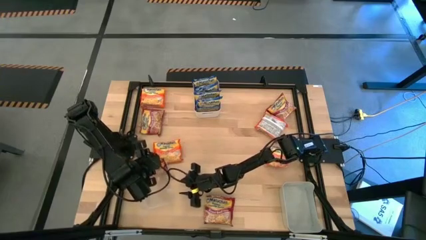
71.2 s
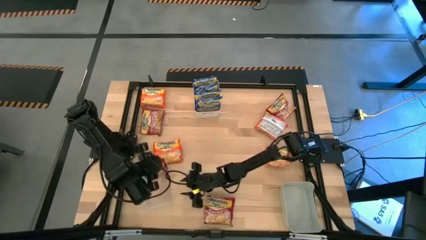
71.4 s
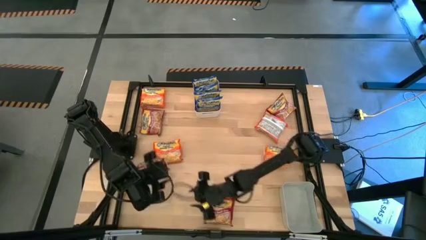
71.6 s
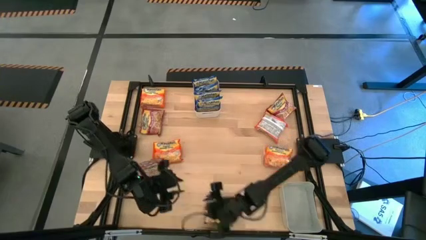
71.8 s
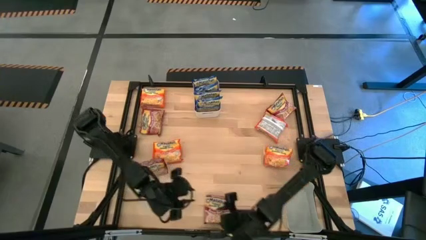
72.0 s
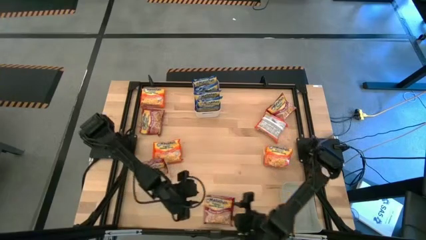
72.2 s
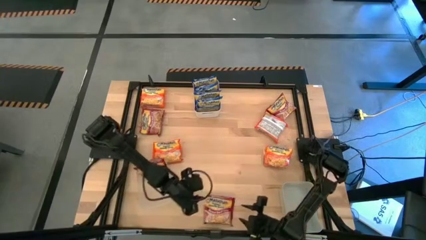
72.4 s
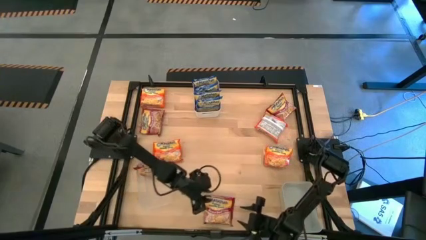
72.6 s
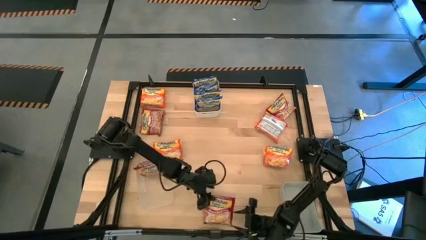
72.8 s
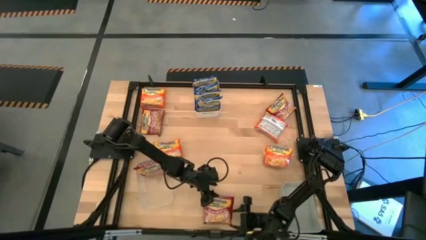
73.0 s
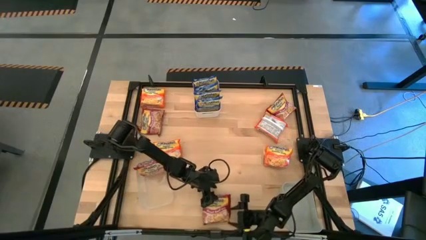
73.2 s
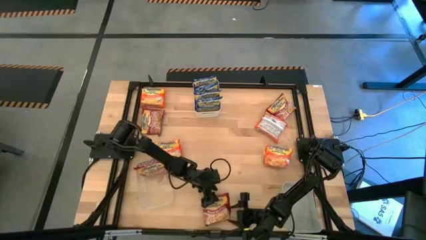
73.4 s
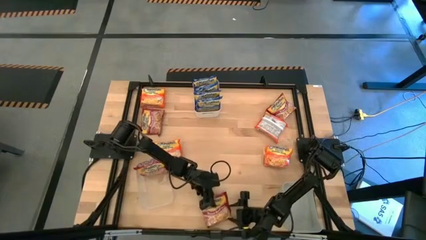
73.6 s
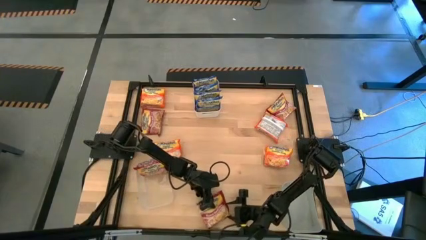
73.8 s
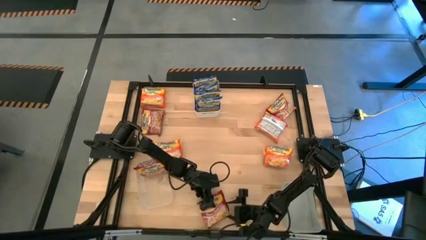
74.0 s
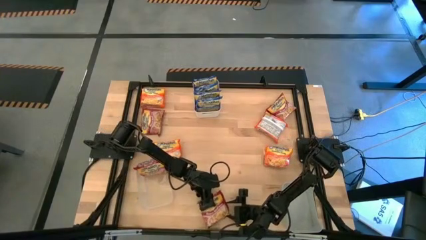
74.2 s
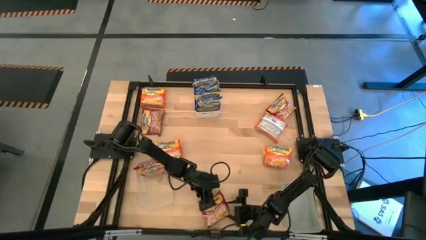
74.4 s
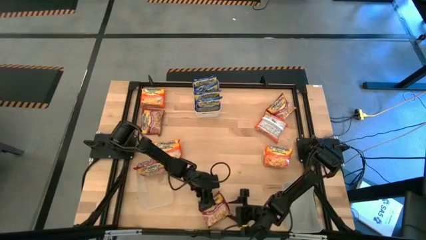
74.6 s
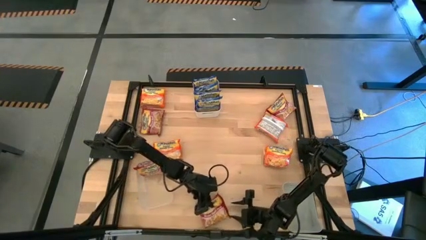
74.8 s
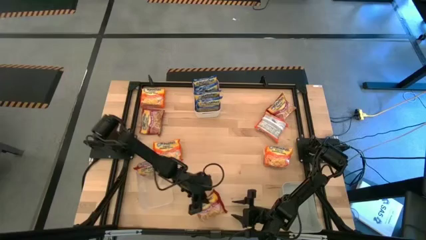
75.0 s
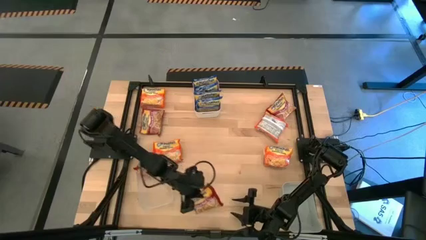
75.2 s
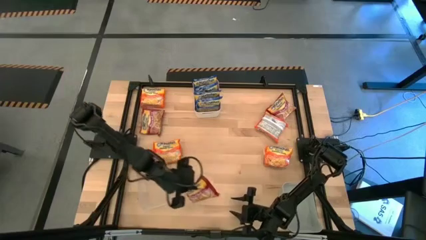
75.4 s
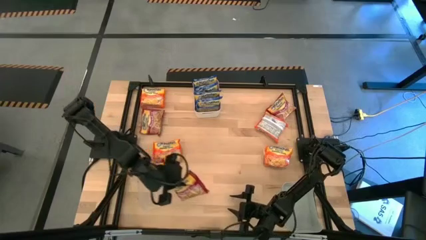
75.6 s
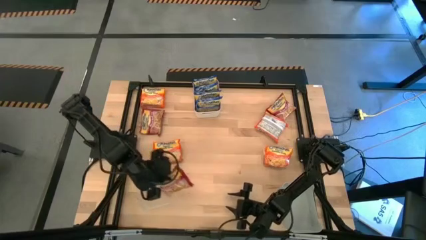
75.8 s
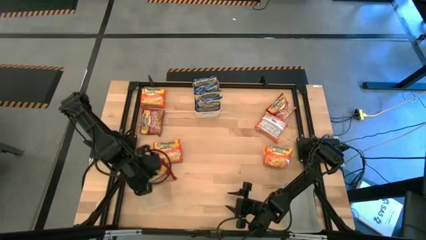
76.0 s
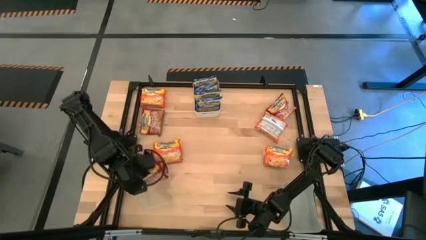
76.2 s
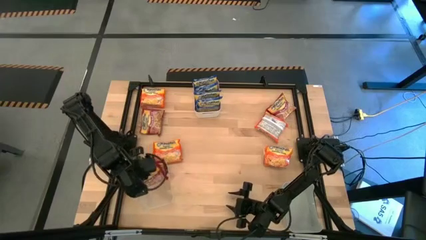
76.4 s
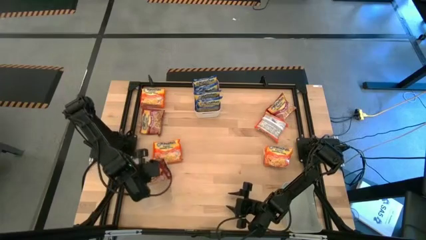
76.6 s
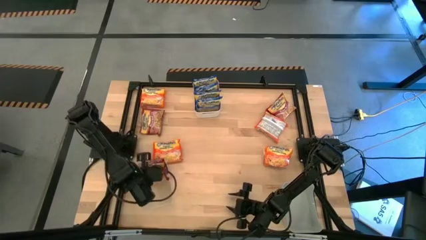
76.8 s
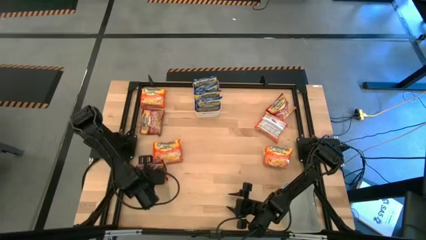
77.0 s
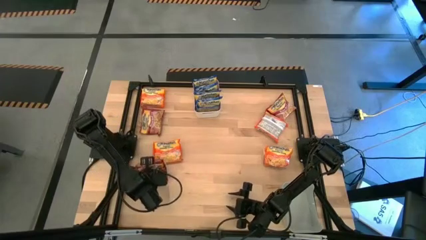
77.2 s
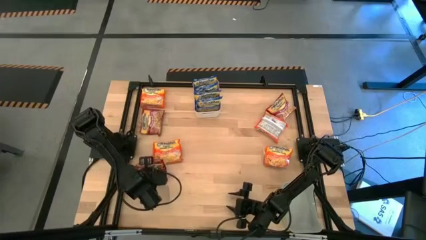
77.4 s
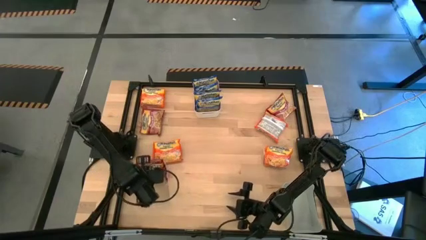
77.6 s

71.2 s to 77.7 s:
Task: Sort Maruchan noodles
Put the red noodle pack into the transparent bin

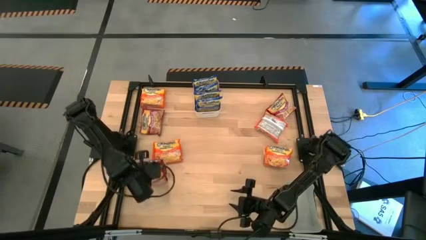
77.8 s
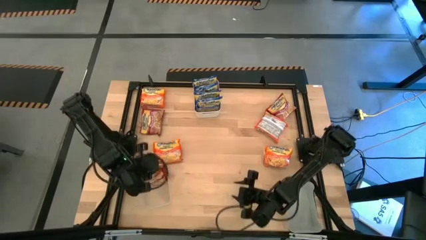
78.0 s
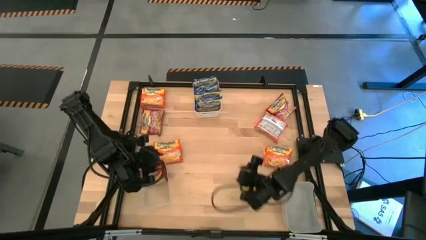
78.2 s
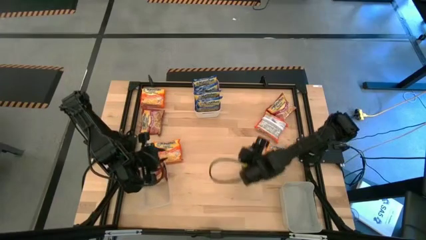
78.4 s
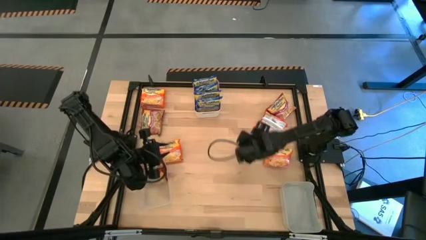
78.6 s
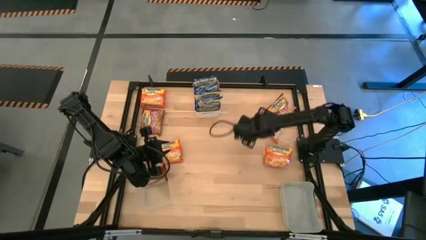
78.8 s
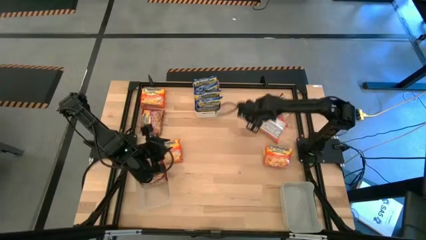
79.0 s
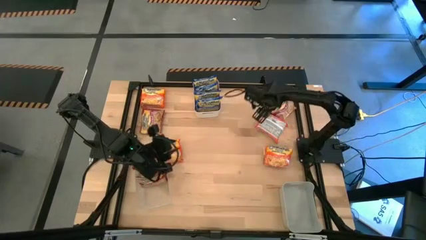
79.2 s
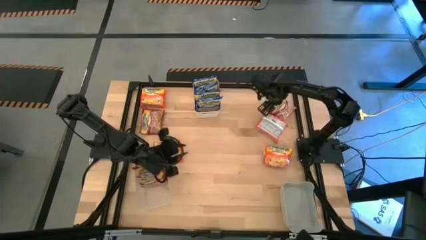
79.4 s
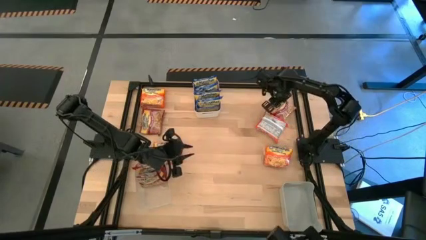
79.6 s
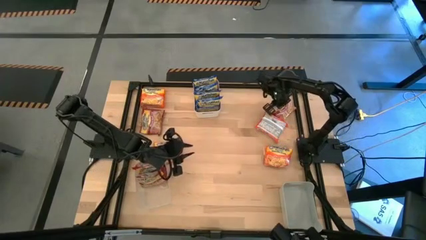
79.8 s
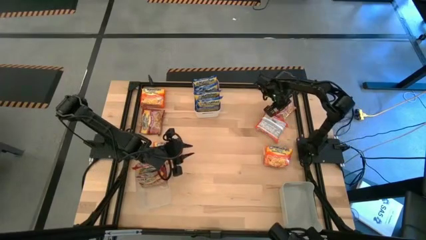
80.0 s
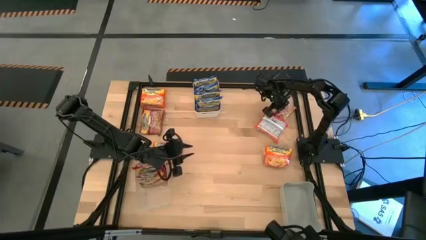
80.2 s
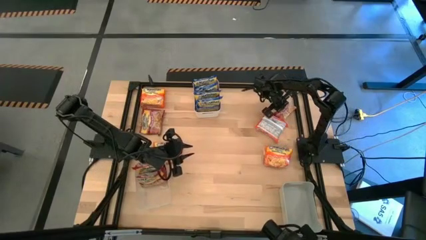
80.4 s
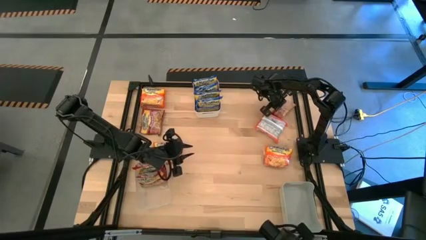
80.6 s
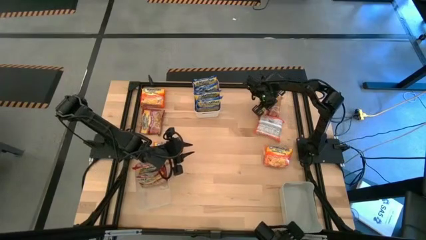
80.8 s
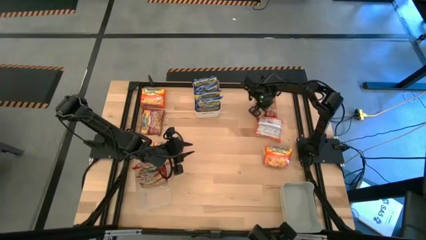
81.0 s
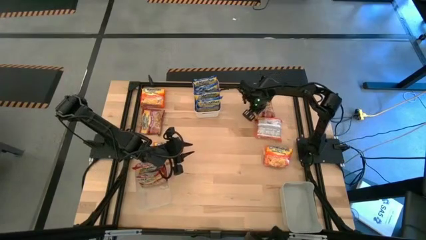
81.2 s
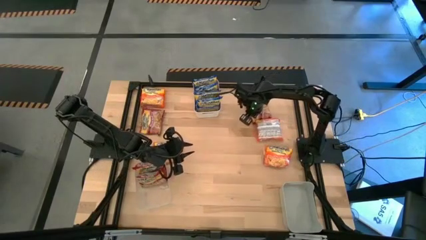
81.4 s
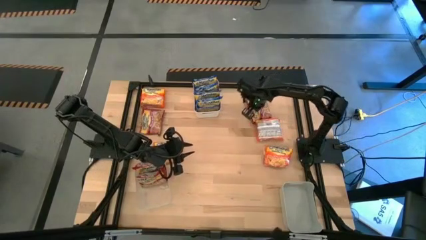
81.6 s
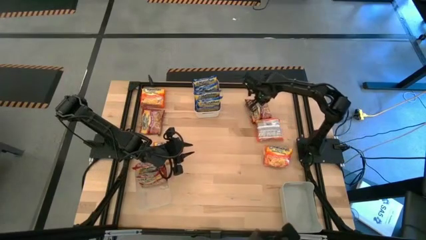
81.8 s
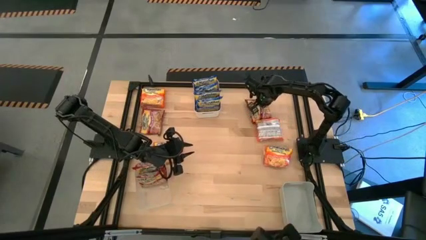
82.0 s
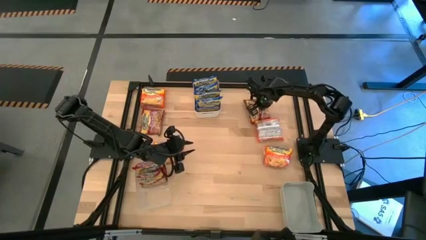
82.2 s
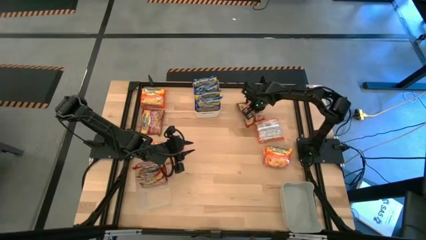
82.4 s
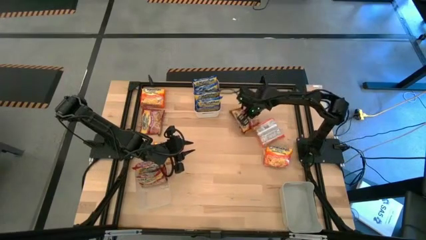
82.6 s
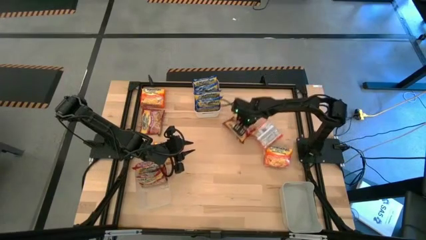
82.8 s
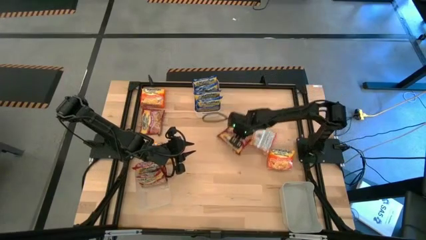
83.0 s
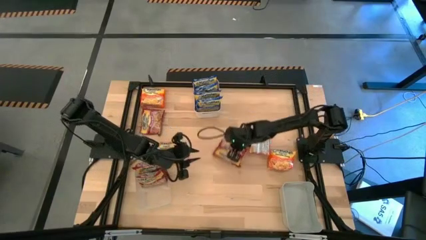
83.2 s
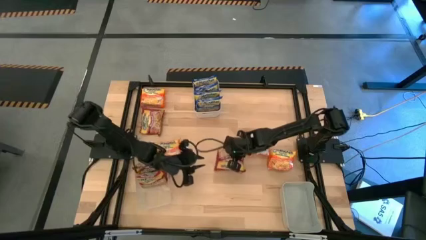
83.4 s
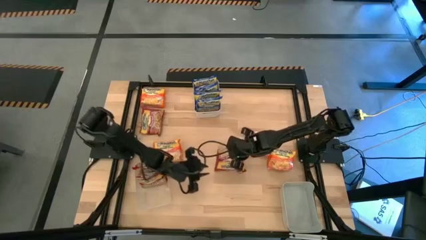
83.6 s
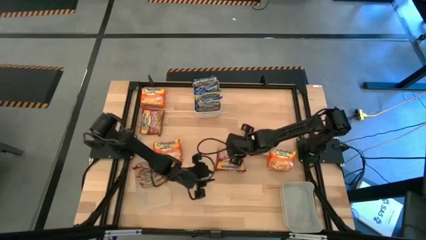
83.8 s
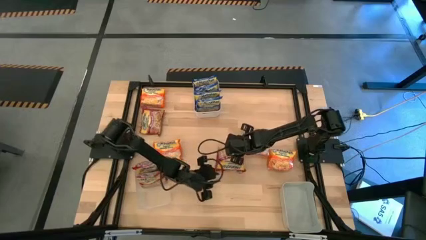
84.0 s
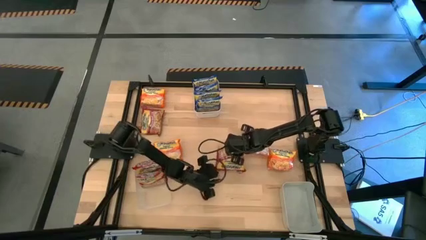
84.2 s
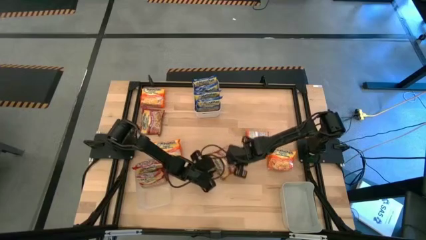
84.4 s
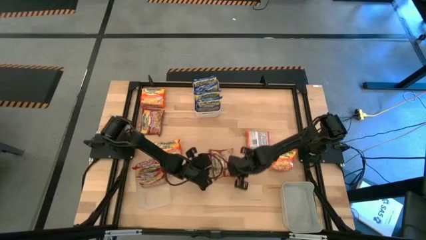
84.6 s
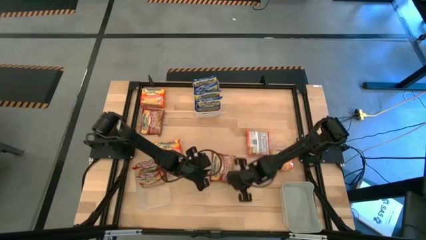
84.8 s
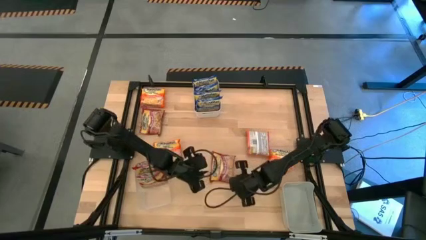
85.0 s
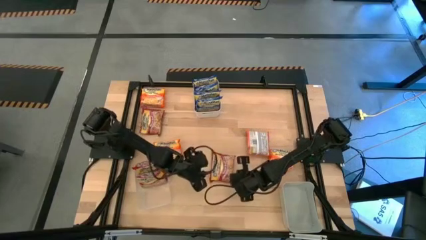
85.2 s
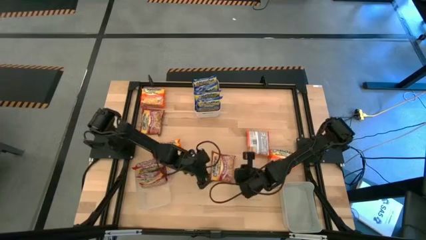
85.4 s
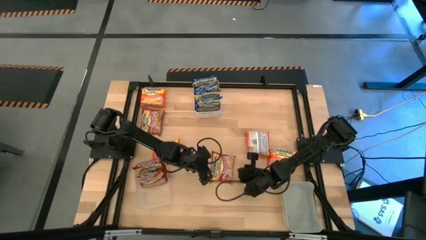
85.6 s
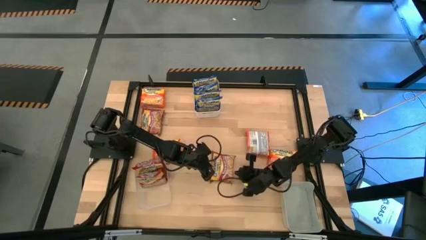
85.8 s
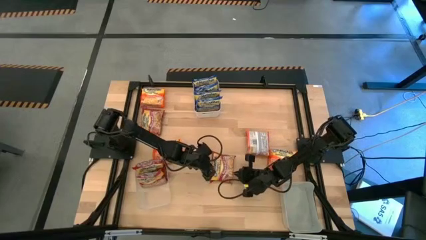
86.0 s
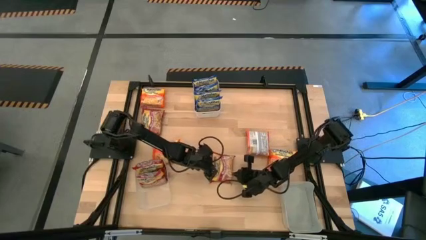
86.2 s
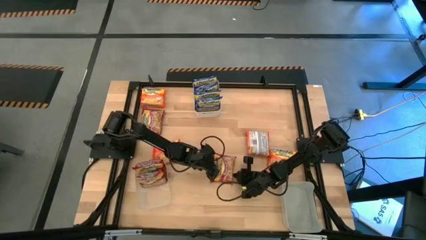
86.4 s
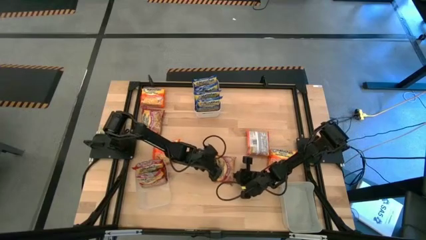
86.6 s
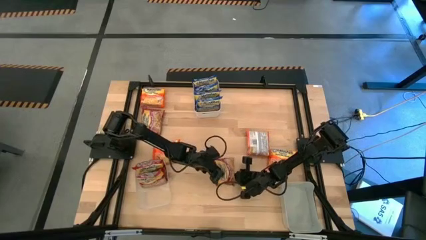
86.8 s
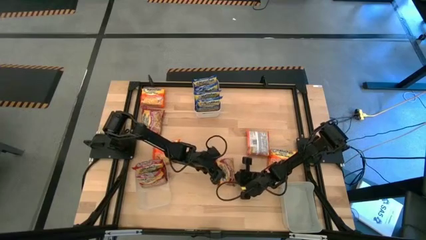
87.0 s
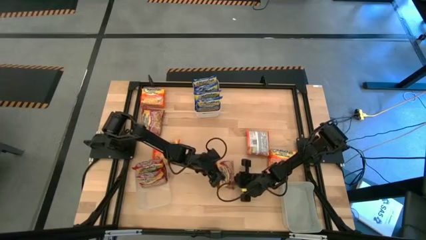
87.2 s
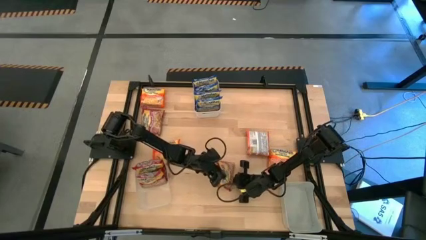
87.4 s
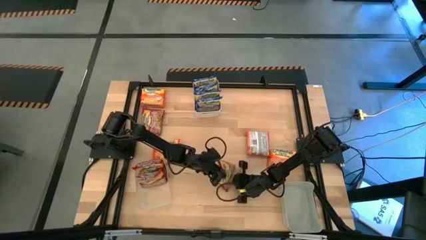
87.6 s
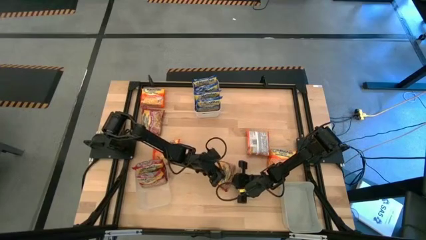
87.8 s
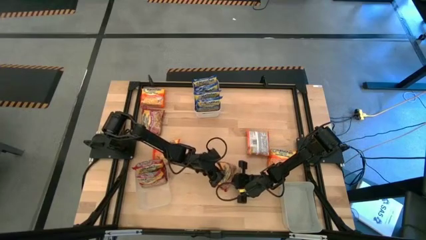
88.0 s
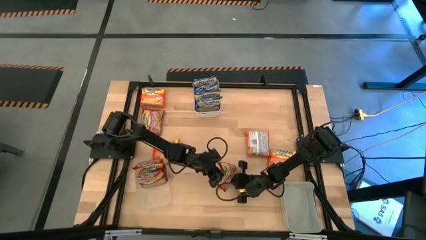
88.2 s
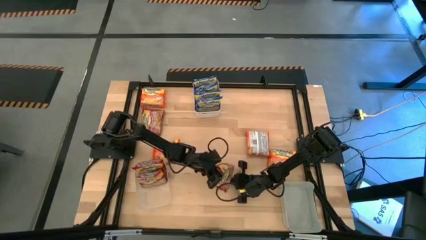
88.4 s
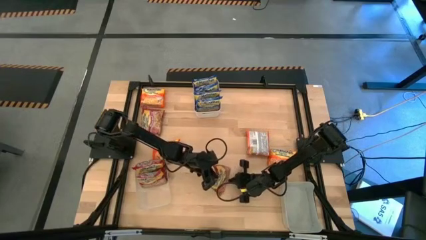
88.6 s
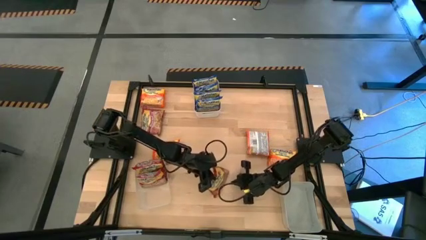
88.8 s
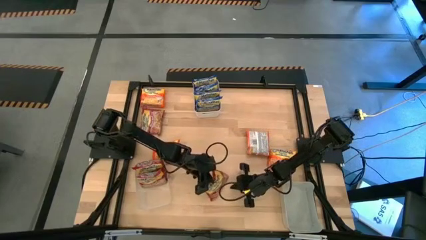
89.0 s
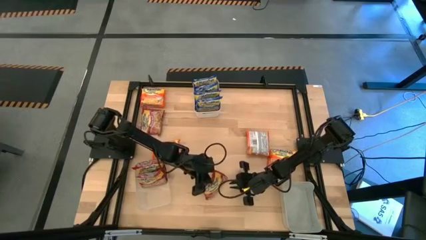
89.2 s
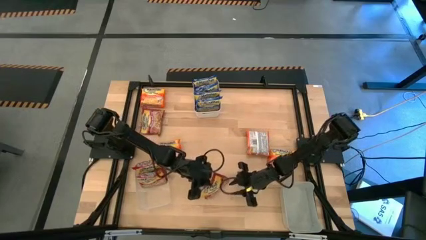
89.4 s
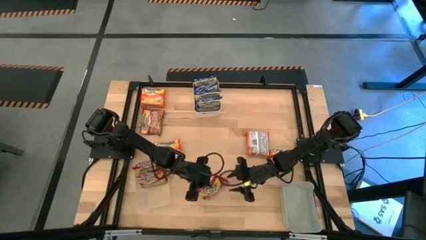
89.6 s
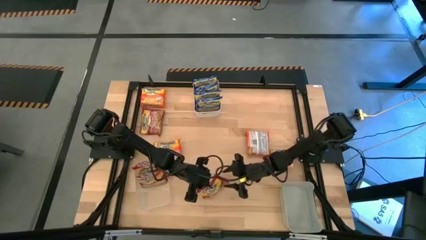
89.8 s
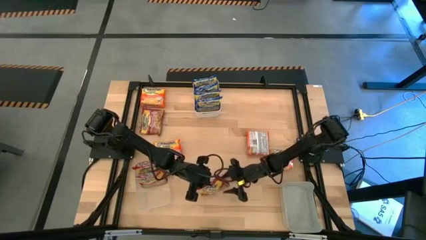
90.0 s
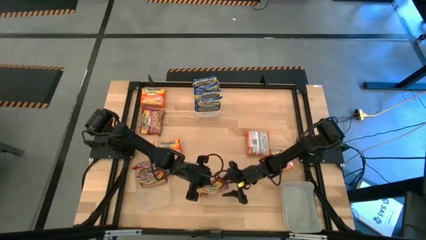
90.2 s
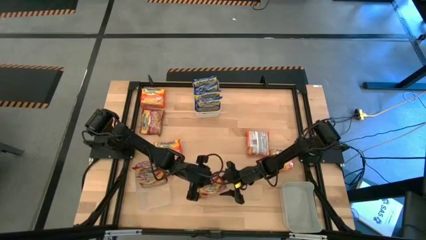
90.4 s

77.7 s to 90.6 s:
Put the red noodle pack into the transparent bin
